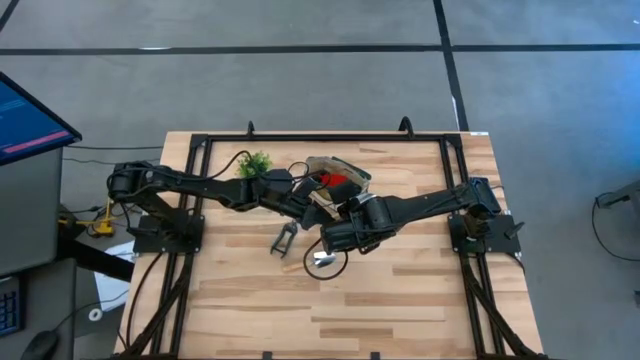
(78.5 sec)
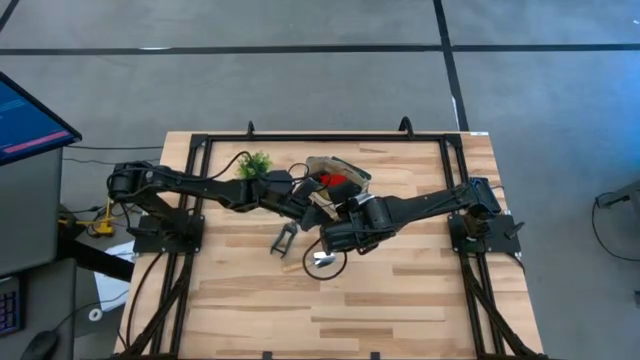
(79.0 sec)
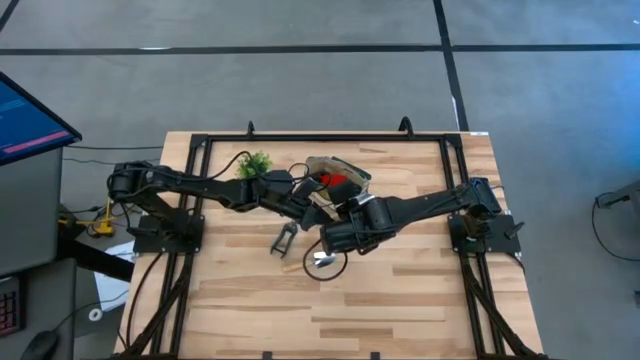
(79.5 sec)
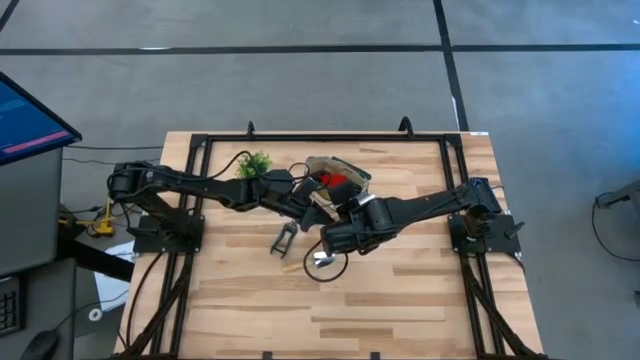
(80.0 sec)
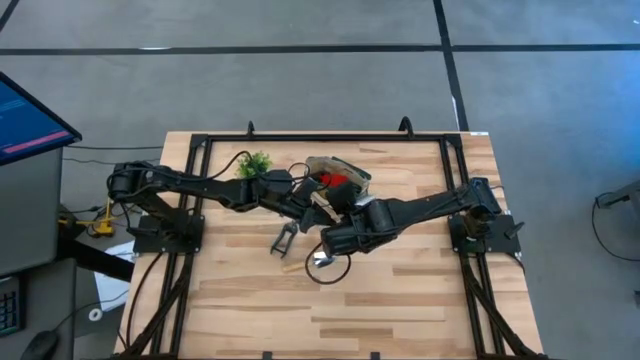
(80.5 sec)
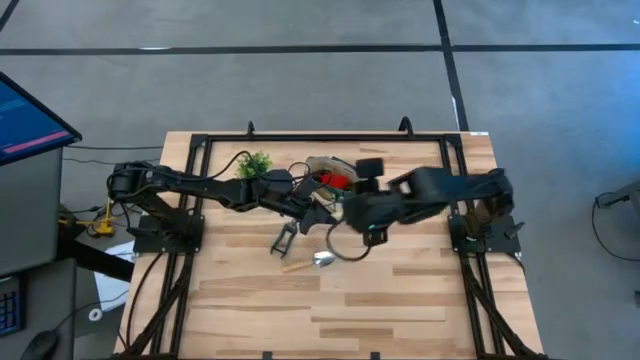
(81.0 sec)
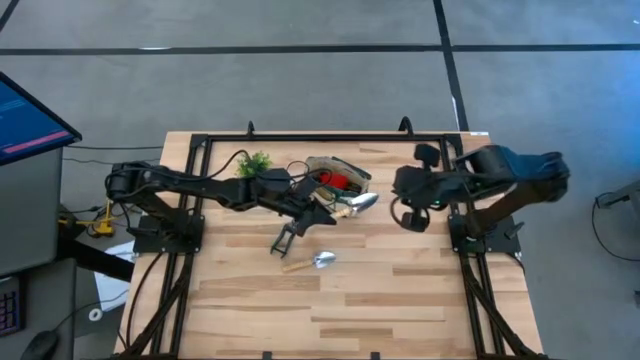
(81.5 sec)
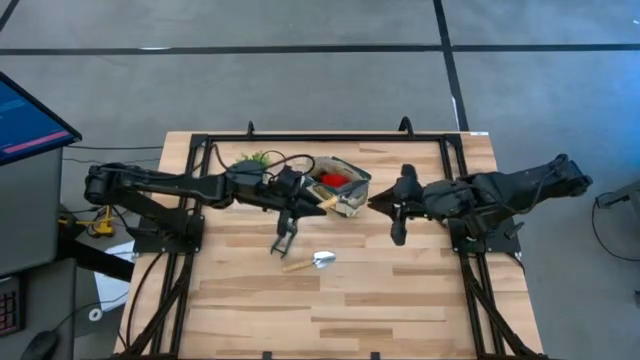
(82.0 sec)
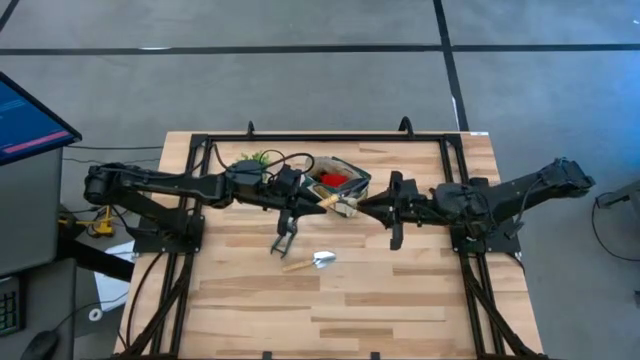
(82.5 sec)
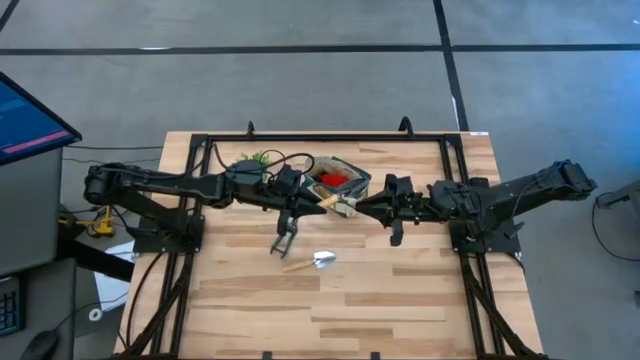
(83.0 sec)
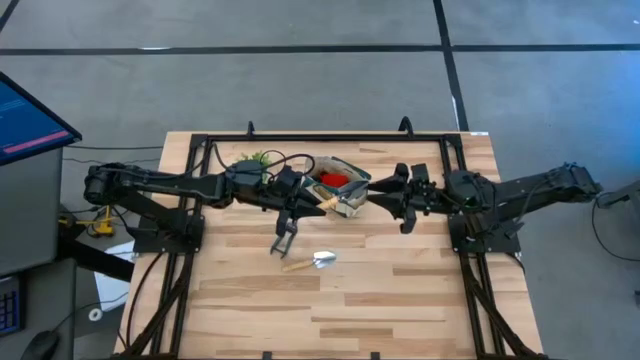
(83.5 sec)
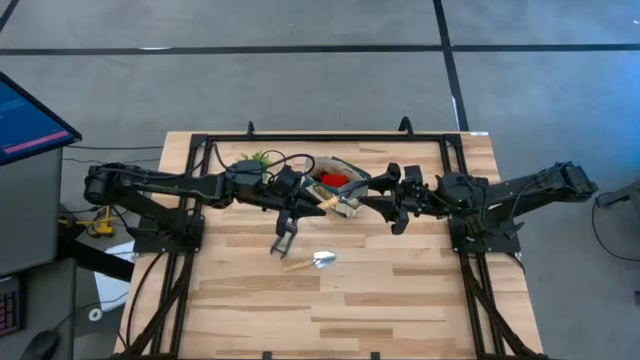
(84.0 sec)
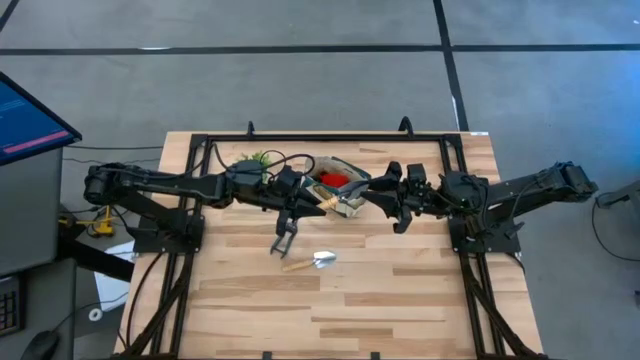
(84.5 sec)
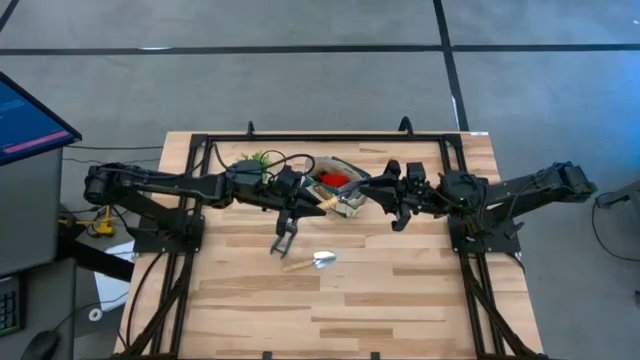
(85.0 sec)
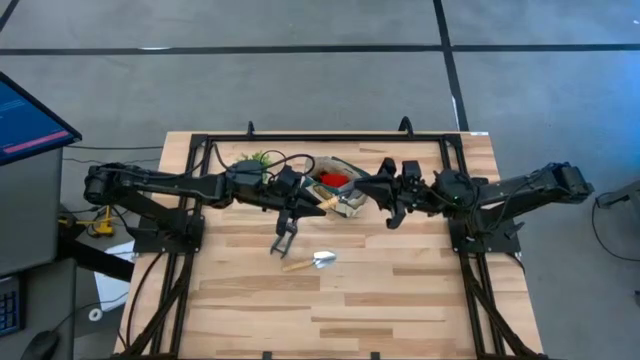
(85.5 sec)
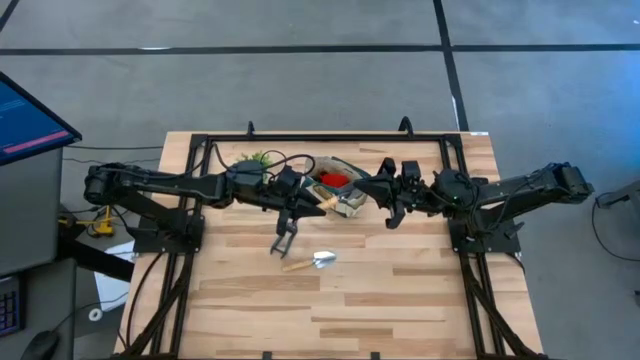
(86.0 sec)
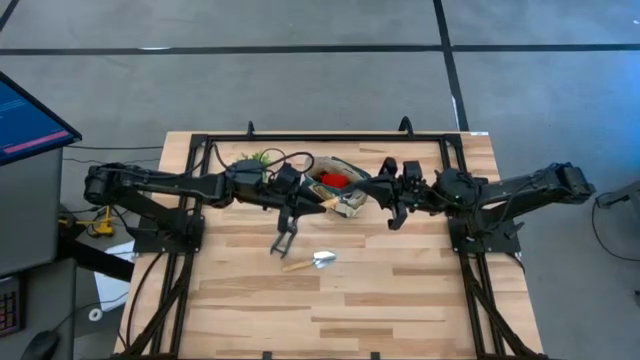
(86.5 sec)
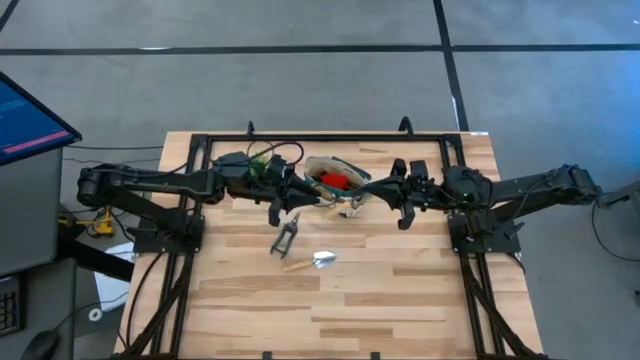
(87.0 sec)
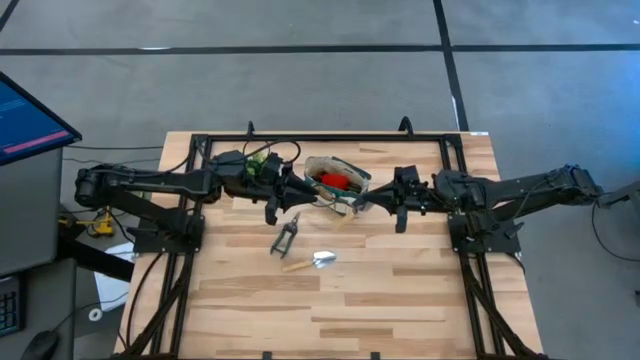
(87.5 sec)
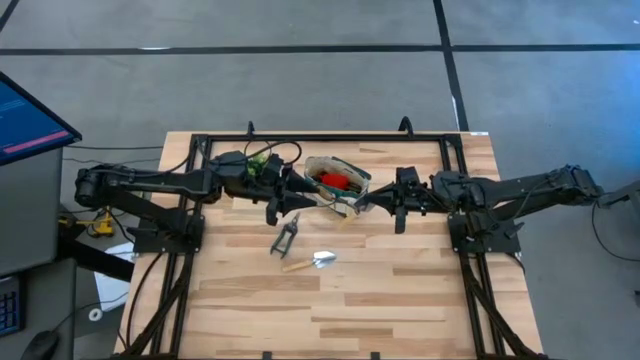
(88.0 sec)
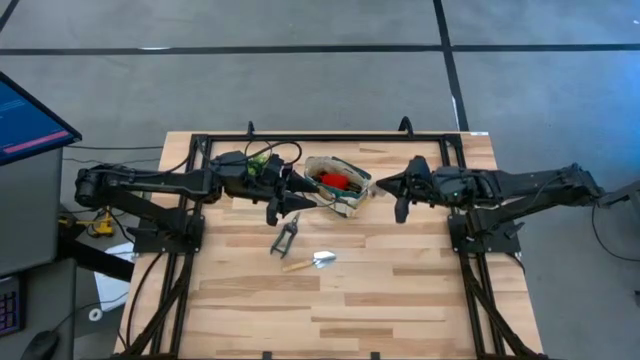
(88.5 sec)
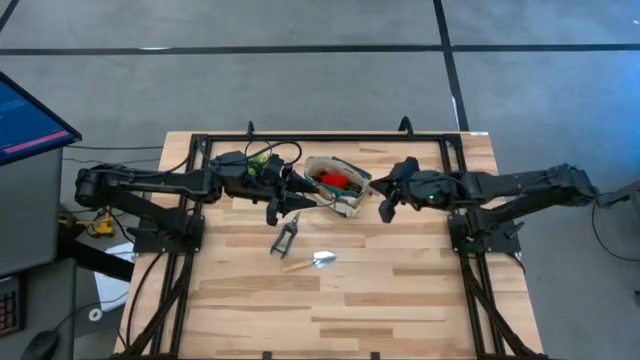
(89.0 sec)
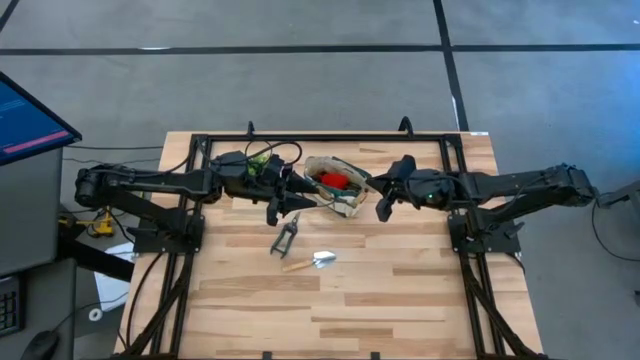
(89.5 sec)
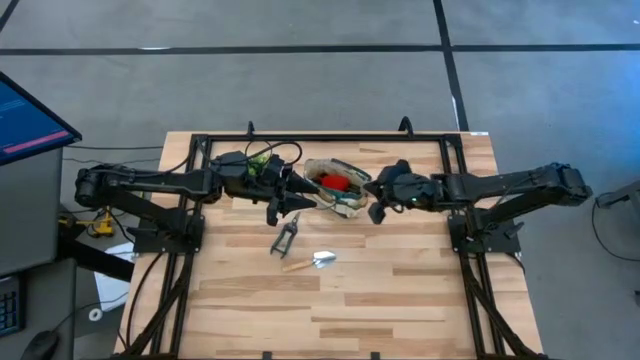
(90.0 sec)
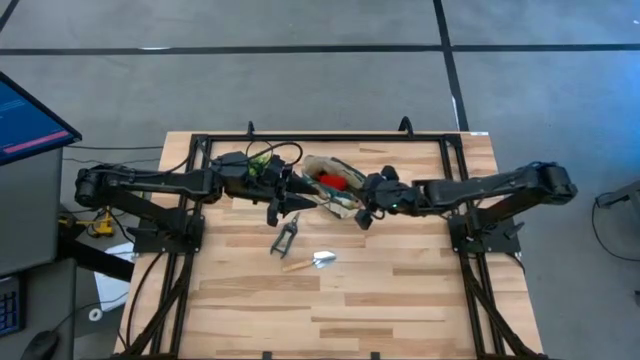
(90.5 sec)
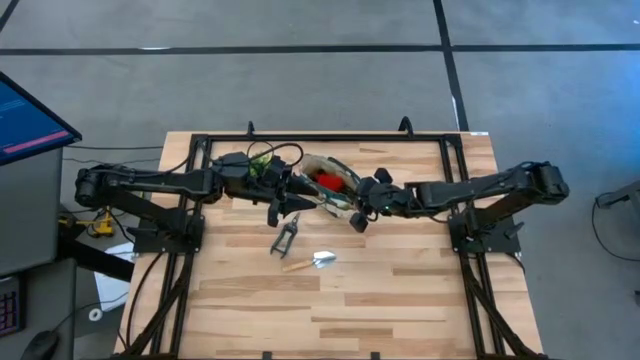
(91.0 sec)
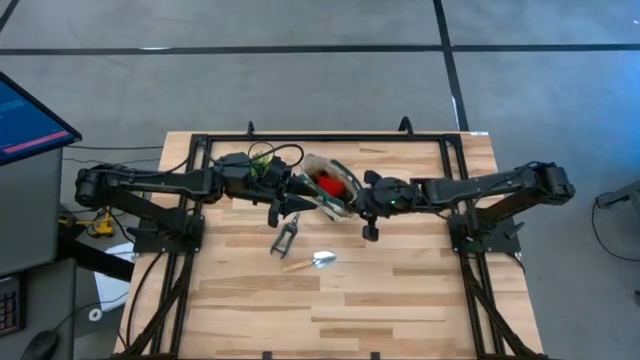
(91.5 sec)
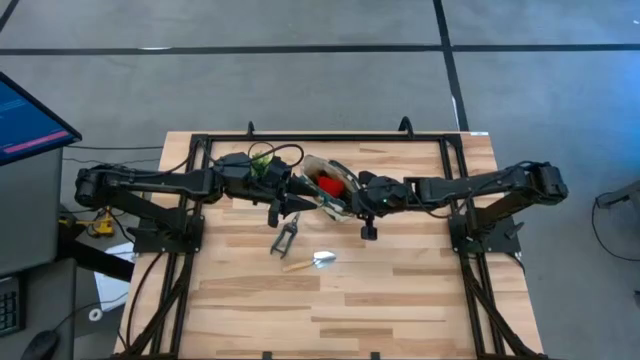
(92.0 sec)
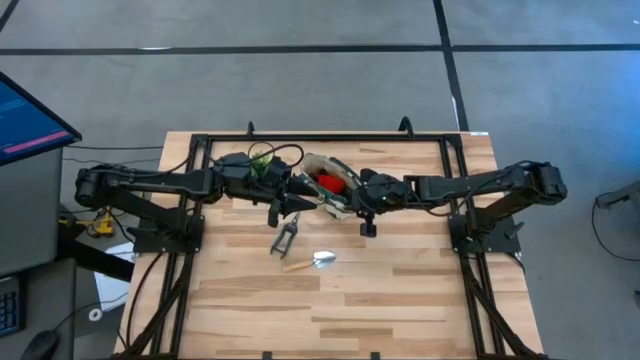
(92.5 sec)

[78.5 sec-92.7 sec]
Task: Pick & Place Garden tools in Gardening bag
Put the right trowel into the side pocket of the gardening bag

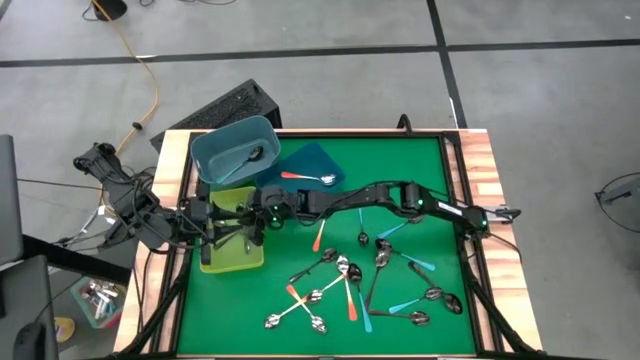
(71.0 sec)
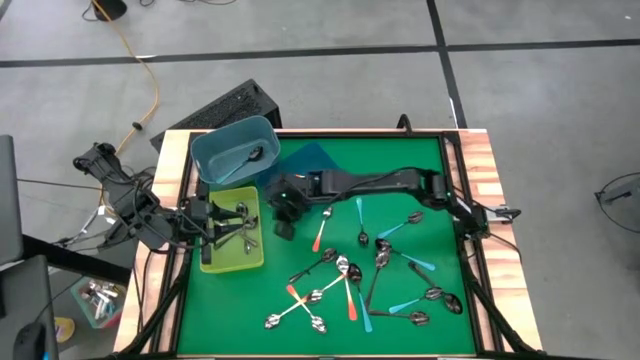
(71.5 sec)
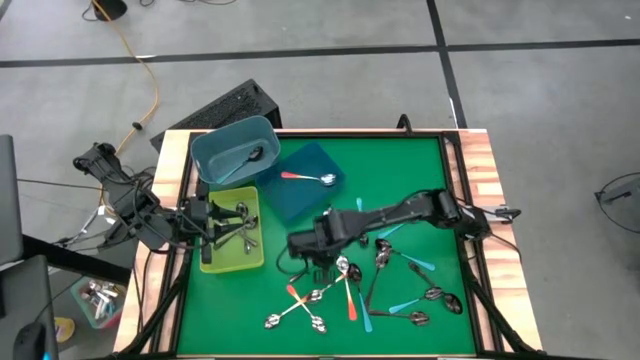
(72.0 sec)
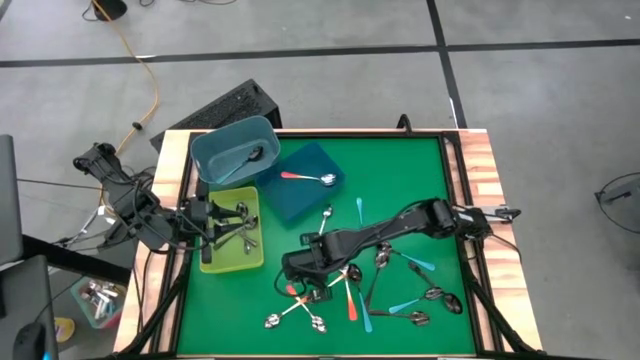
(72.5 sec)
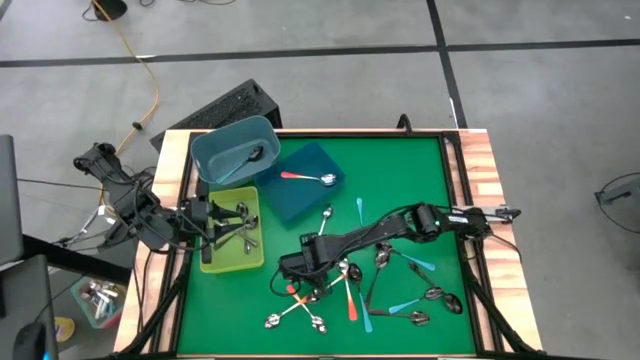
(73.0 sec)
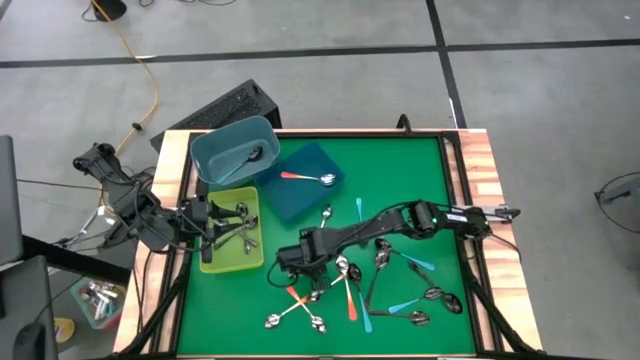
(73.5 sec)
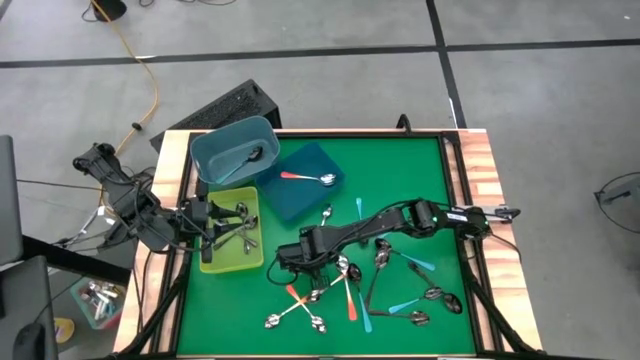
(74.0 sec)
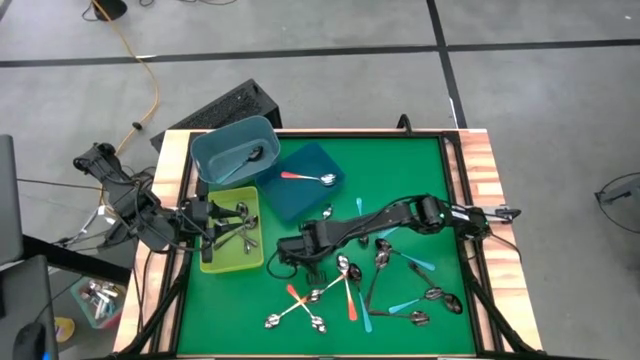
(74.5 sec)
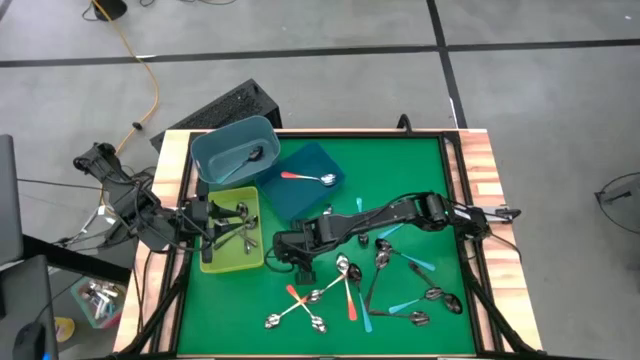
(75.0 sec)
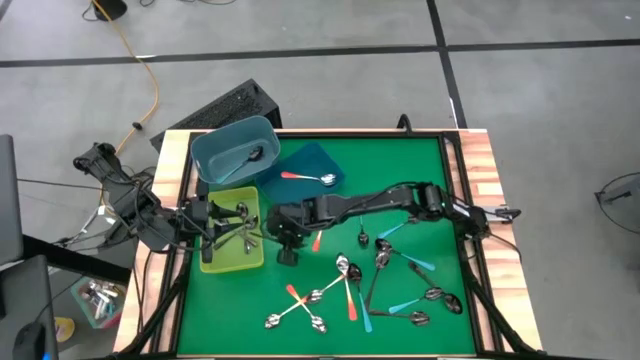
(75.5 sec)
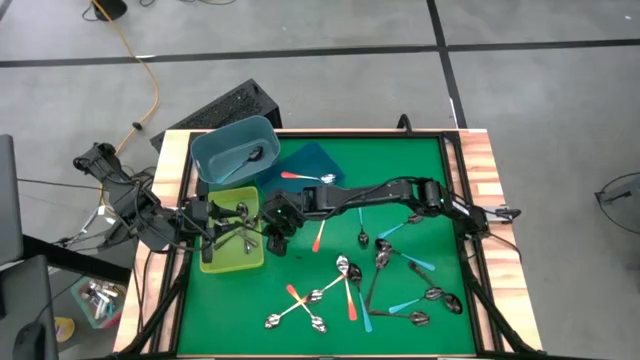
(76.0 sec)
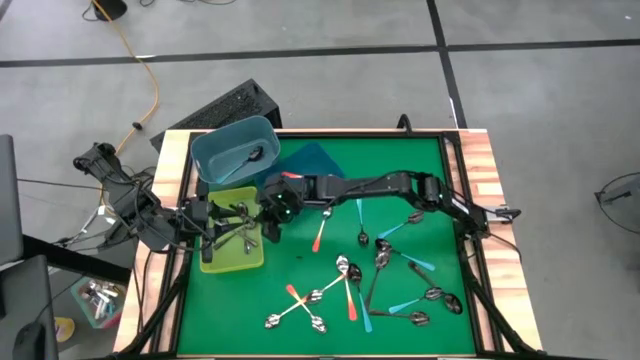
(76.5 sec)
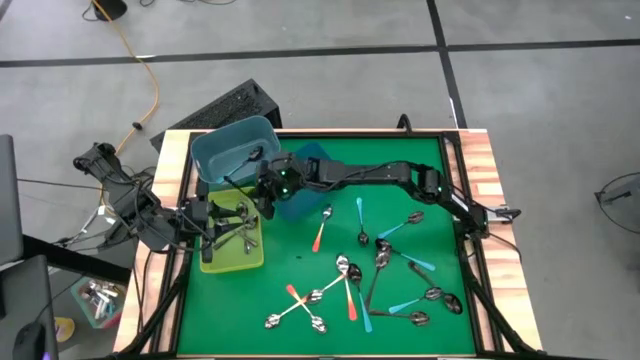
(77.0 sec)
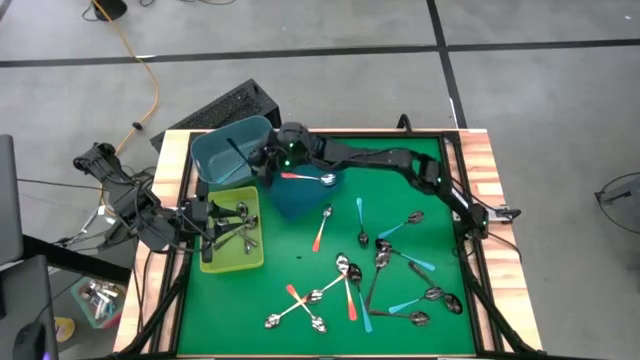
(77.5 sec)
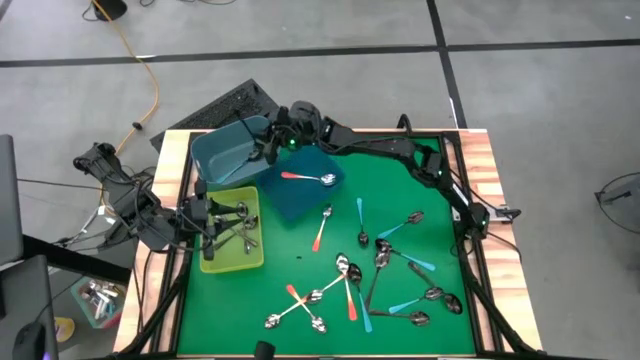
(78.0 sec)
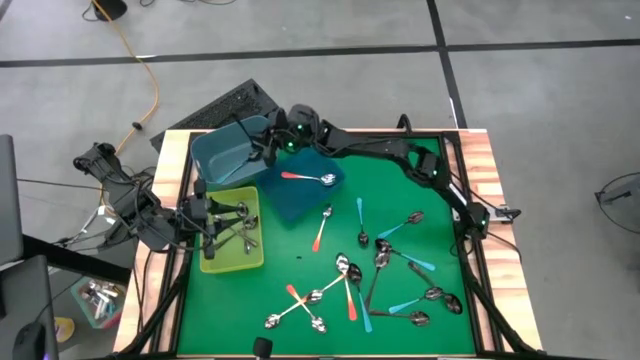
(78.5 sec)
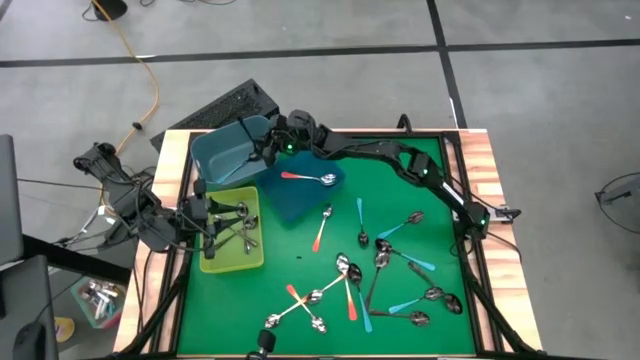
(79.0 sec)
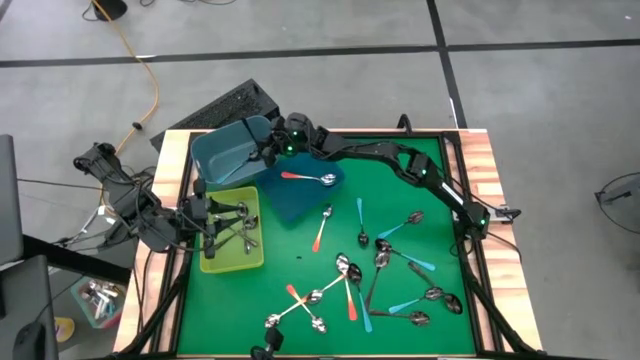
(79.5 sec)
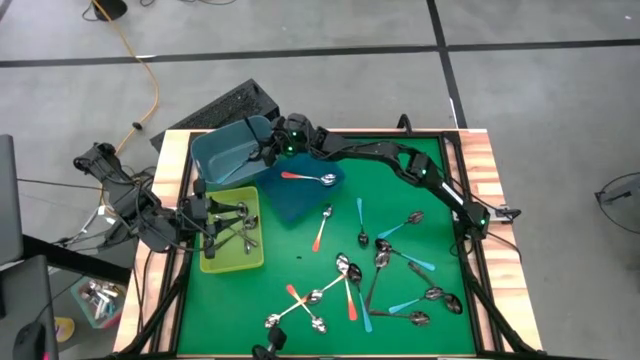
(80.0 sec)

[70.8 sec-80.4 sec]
Task: Sort silverware by color (type)
Put the black spoon into the green bin
